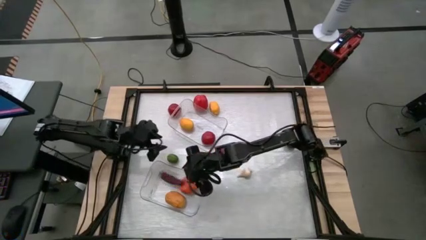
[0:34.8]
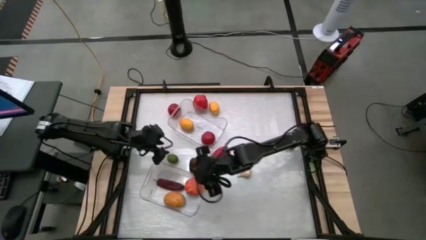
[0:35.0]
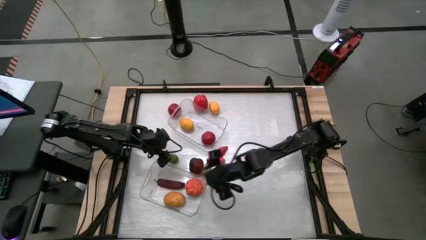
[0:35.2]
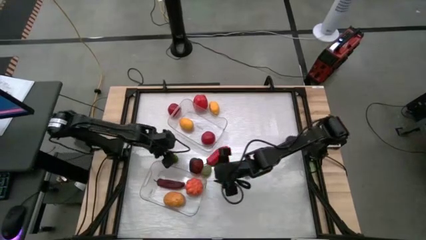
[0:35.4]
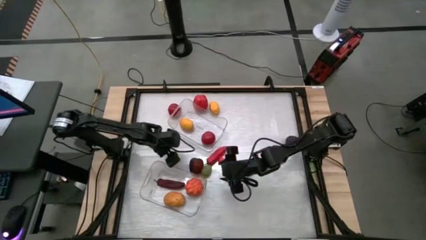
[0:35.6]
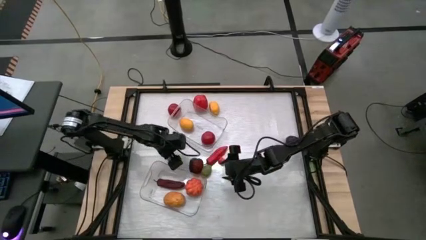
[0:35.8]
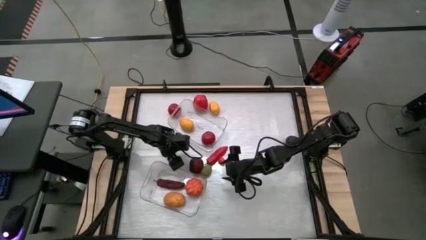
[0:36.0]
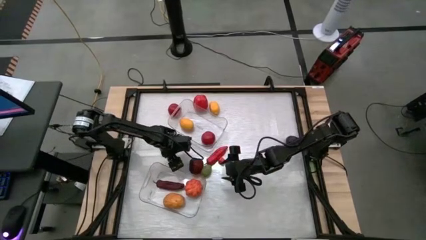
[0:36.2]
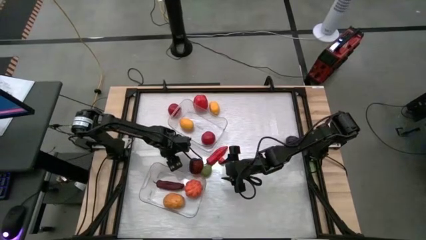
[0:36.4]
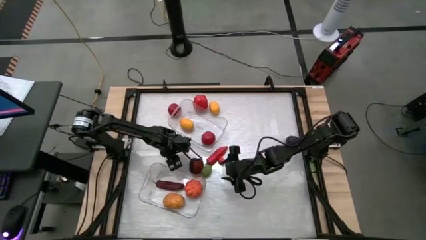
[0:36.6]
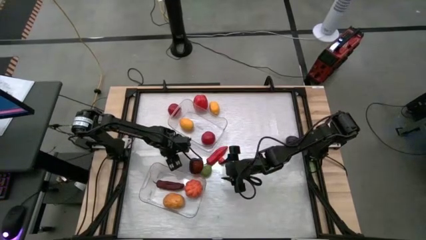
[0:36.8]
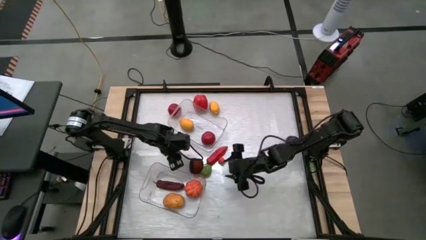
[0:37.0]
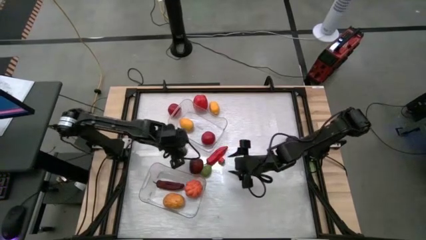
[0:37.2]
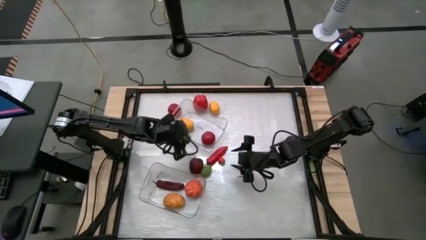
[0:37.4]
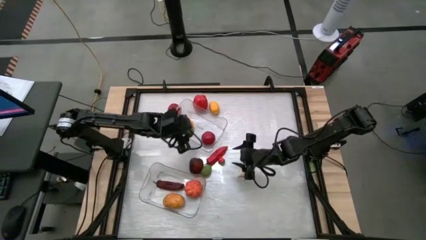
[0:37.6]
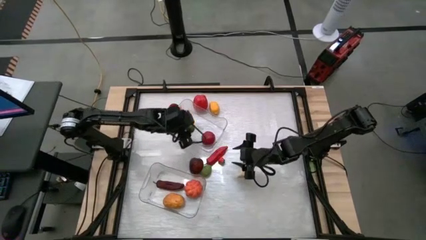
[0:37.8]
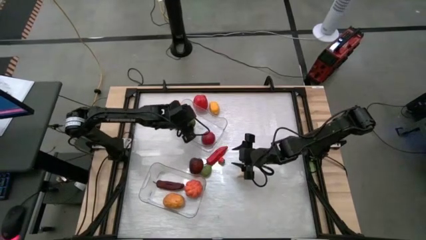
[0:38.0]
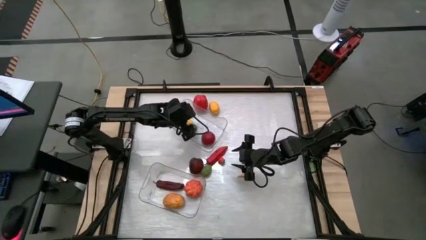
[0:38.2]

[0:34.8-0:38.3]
Task: Sort produce into baskets
Put the left lime into the top transparent bin

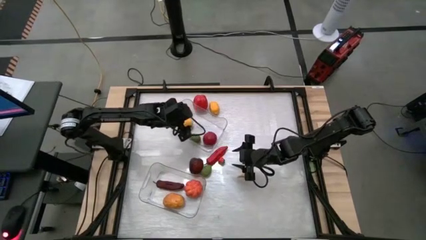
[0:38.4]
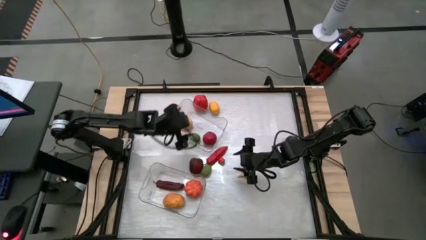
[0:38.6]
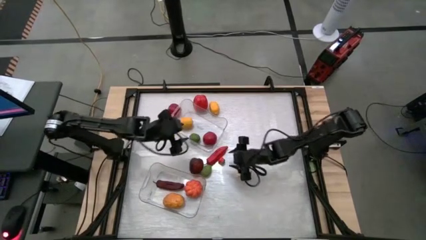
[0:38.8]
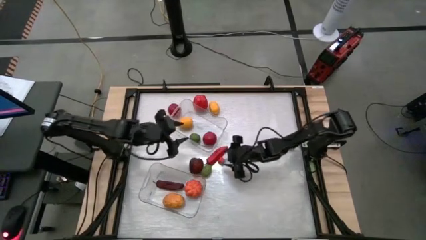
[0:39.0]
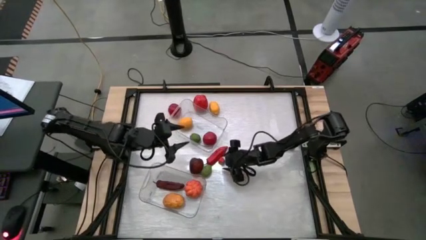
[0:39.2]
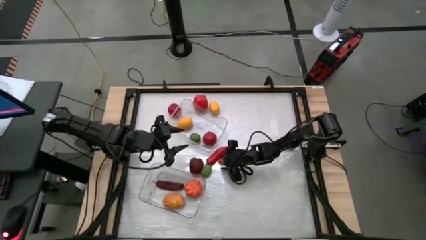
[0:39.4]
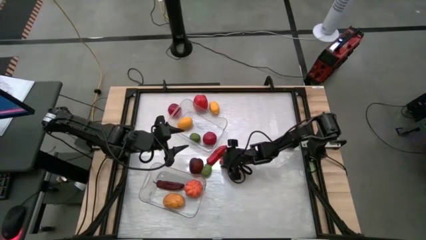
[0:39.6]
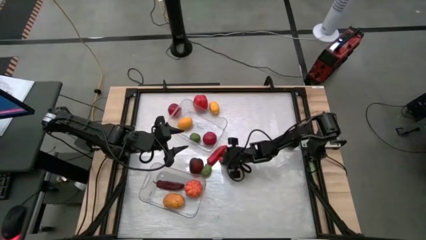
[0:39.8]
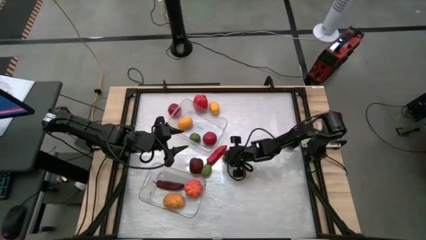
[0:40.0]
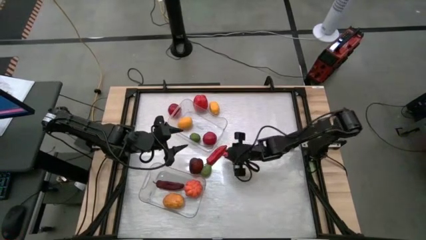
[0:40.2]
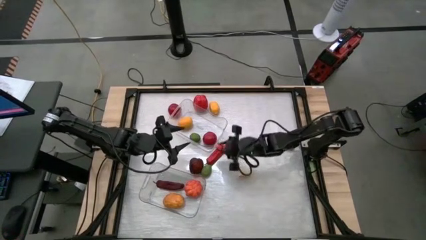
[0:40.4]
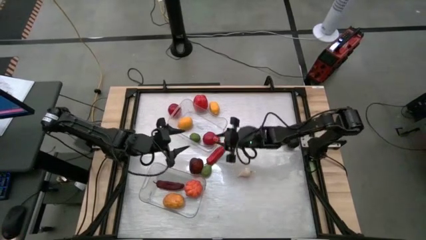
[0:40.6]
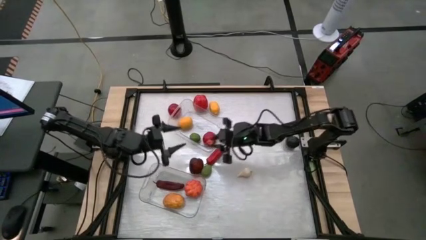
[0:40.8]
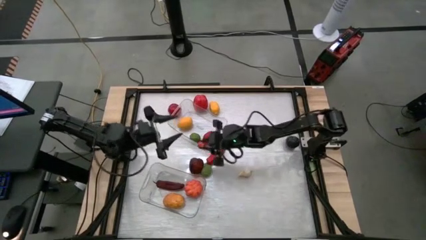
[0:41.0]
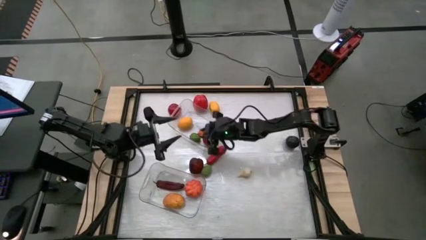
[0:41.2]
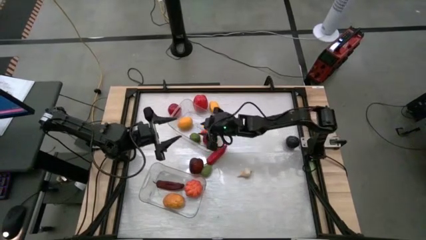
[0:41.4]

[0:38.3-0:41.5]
Put the persimmon into the top transparent bin

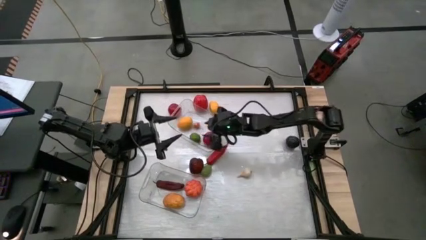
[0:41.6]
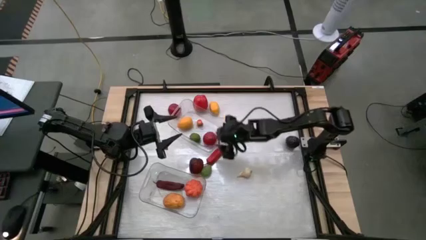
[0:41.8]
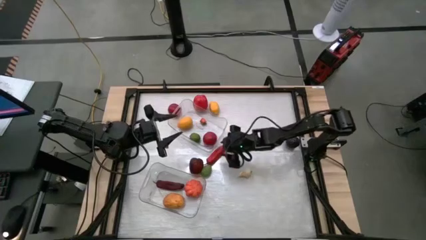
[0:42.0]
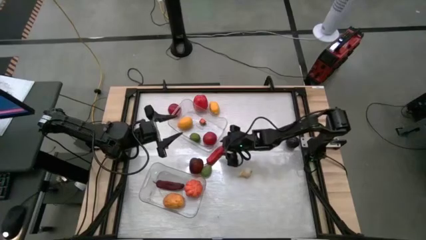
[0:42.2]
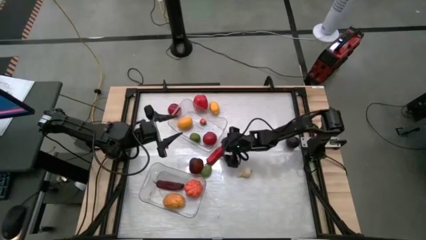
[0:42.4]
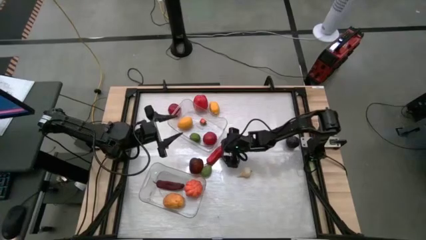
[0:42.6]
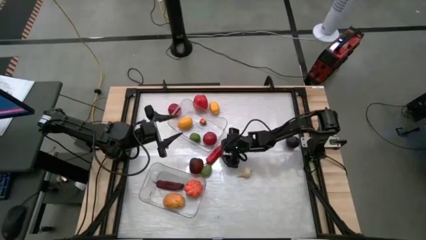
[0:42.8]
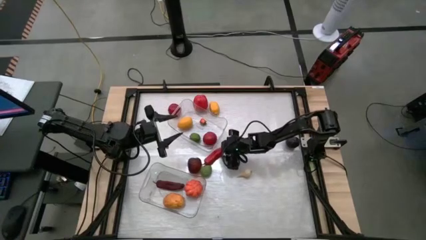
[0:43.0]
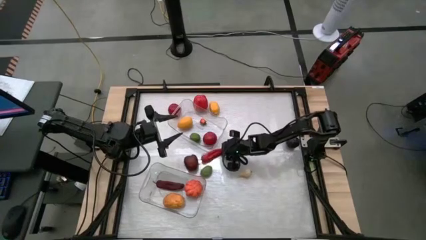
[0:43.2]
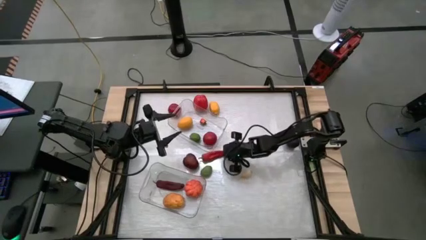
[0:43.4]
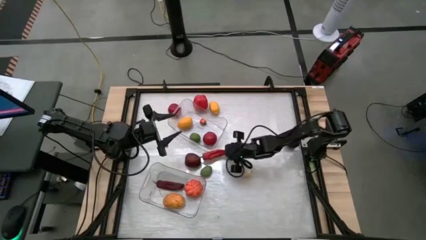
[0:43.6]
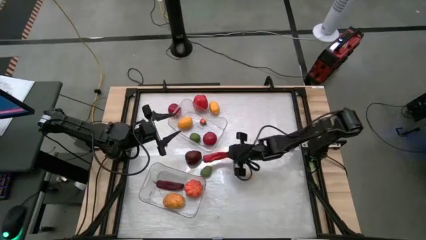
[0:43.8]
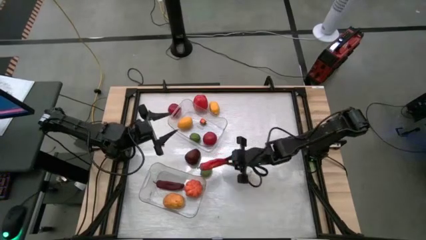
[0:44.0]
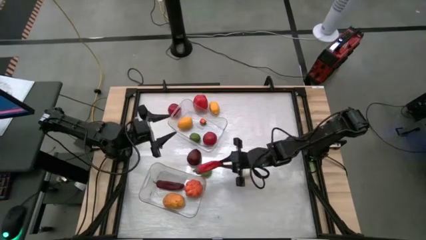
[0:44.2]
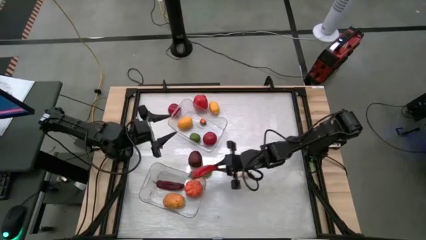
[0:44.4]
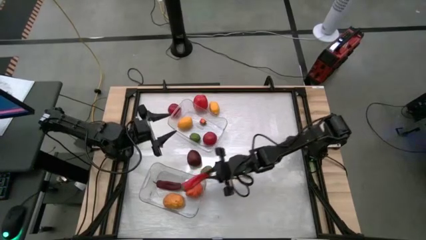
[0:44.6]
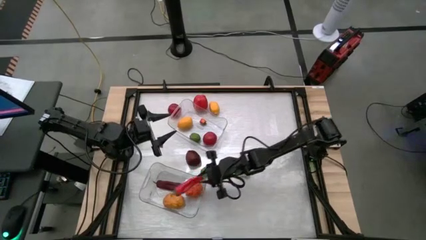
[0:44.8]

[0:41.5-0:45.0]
Put the pepper into the bottom transparent bin

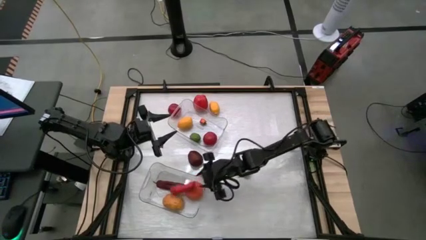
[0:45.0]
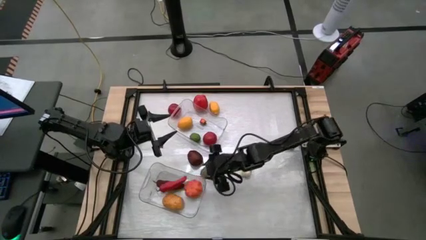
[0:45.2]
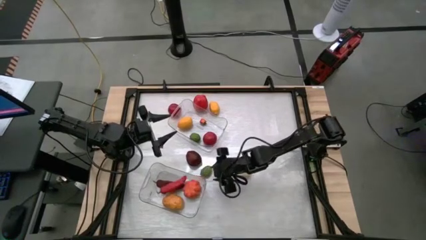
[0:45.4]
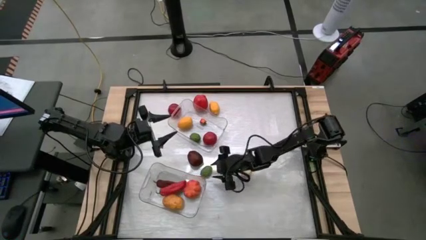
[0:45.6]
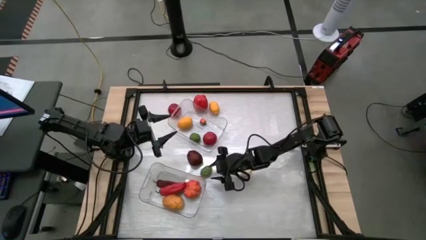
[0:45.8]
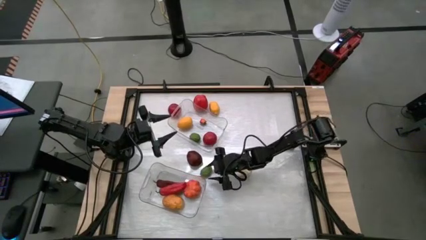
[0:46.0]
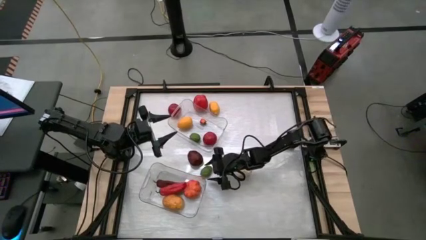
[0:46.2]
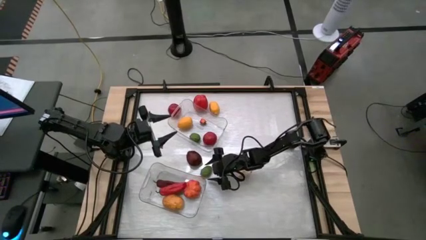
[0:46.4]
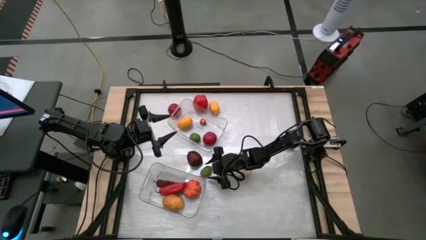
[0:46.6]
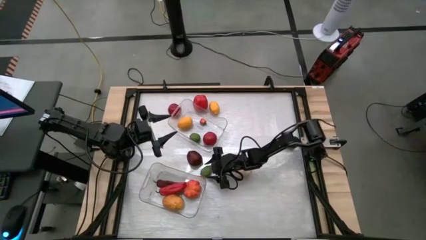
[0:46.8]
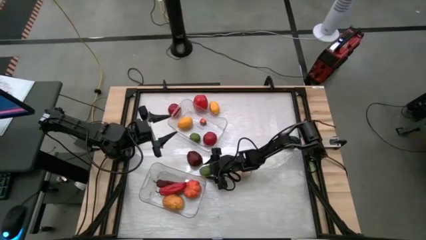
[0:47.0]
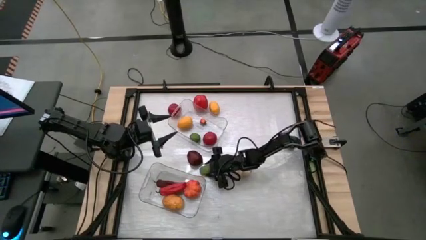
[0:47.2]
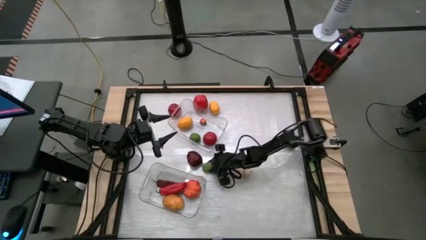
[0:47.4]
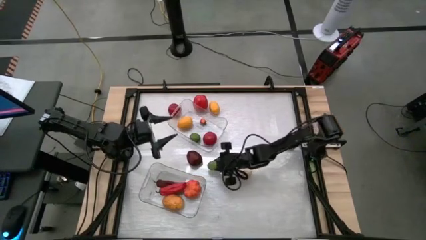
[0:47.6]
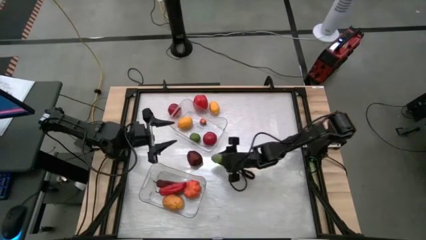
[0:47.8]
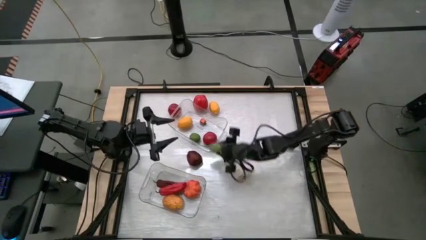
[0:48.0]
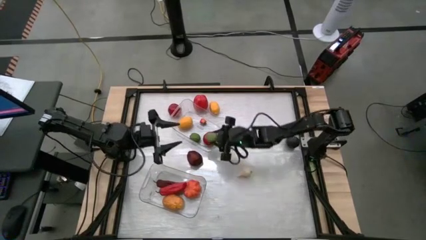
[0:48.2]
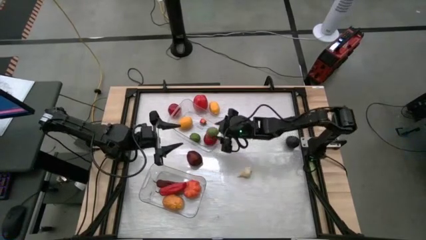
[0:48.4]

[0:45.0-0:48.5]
Put the lime into the top transparent bin

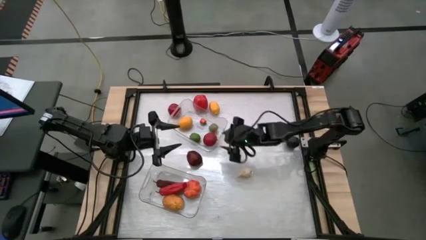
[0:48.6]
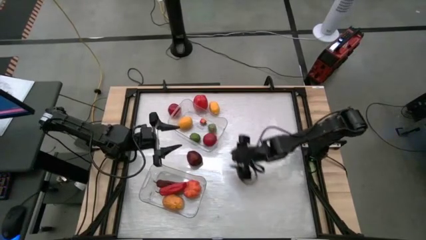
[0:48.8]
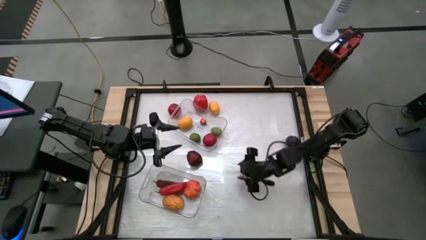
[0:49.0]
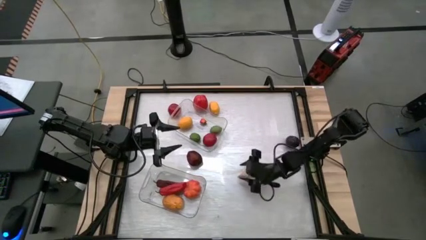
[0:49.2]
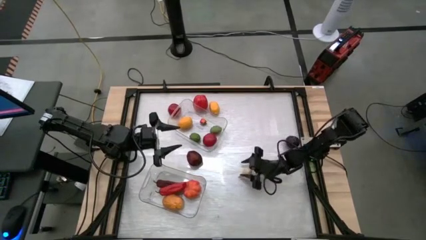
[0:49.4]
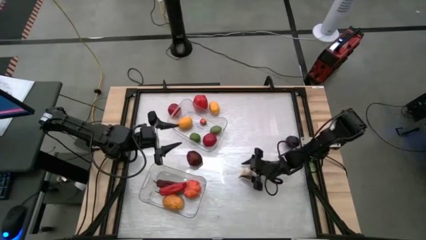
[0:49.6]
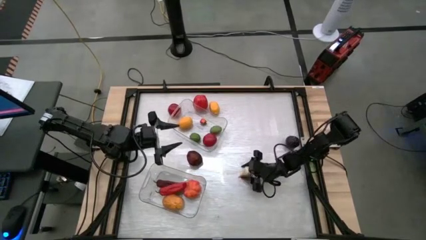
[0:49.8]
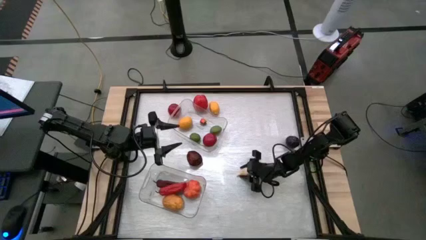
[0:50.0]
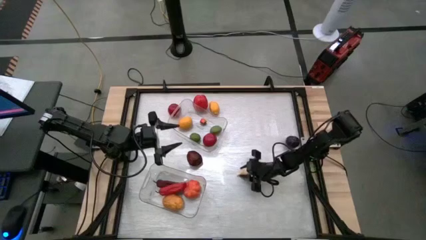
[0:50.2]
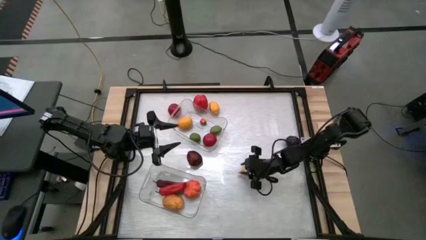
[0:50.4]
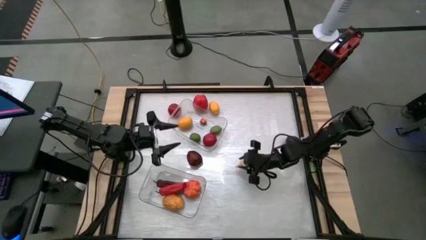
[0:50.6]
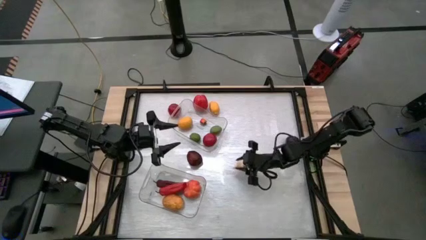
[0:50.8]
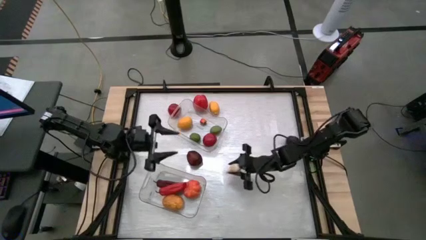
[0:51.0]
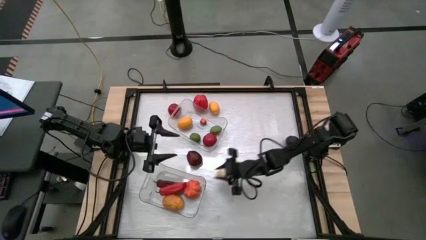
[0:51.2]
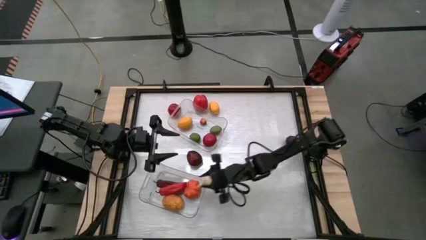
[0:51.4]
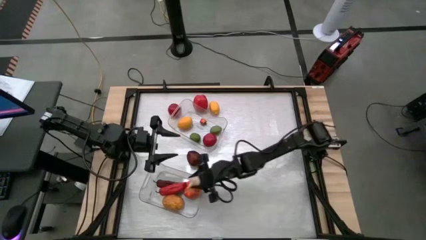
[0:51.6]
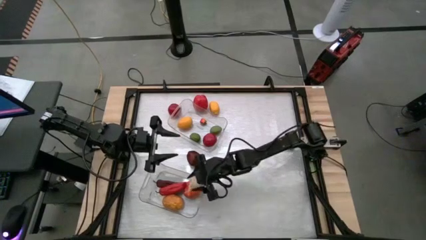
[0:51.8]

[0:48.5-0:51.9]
Put the garlic into the bottom transparent bin
